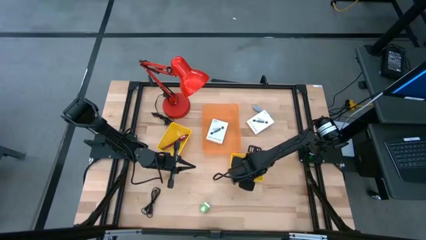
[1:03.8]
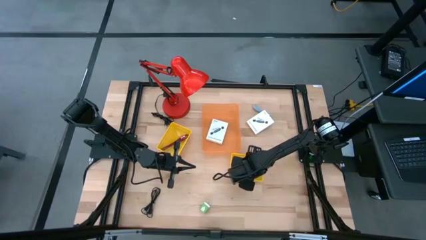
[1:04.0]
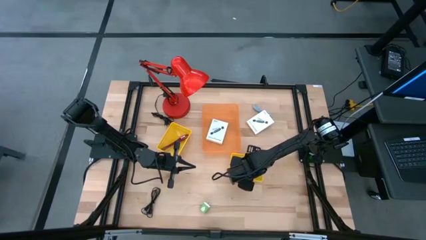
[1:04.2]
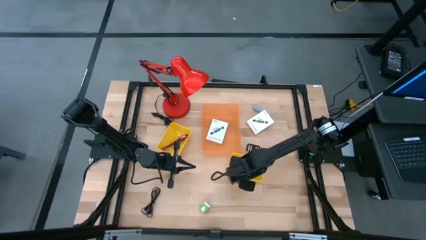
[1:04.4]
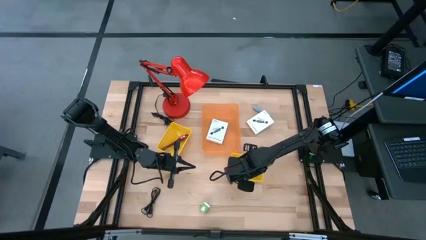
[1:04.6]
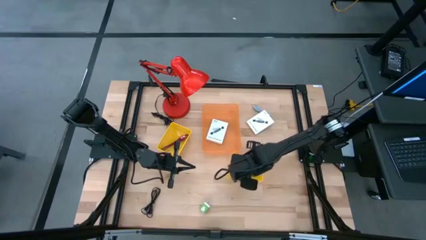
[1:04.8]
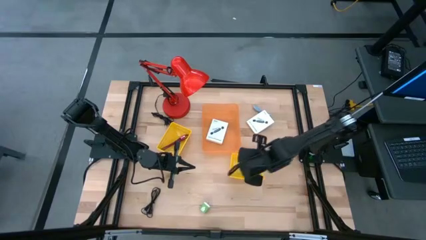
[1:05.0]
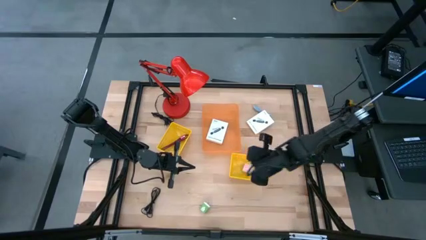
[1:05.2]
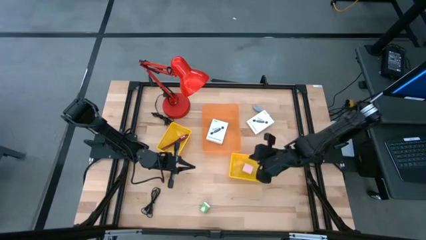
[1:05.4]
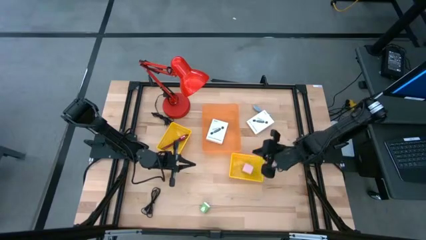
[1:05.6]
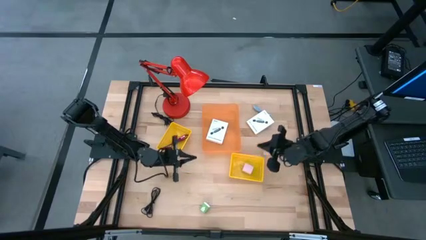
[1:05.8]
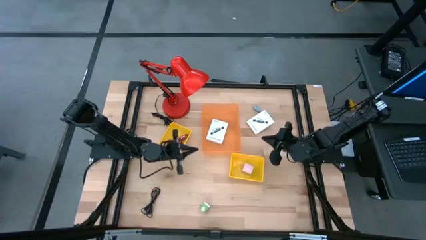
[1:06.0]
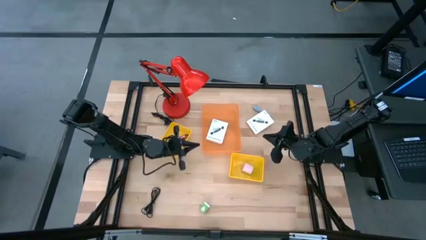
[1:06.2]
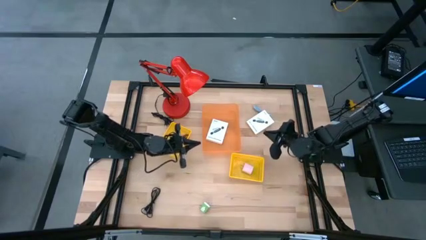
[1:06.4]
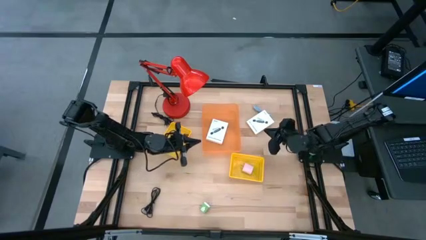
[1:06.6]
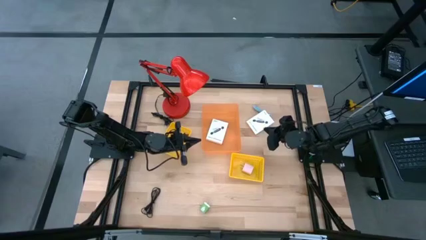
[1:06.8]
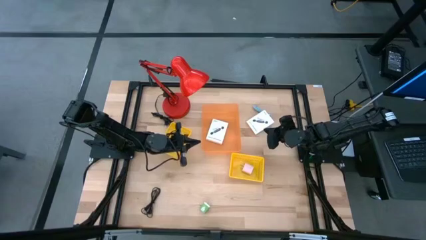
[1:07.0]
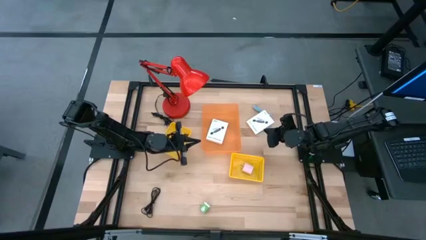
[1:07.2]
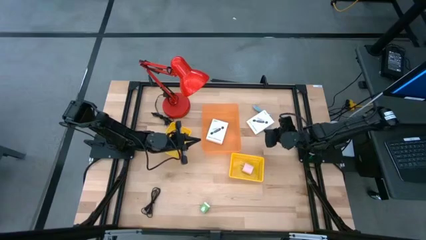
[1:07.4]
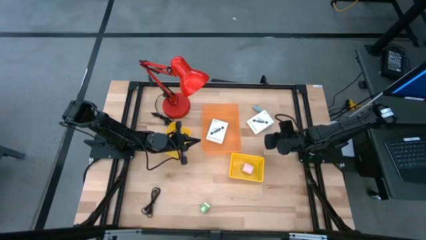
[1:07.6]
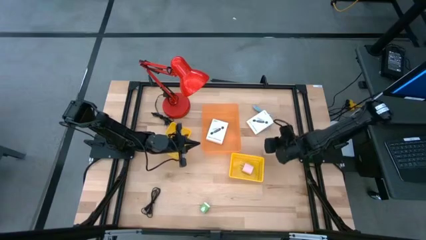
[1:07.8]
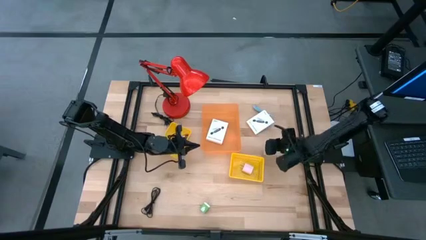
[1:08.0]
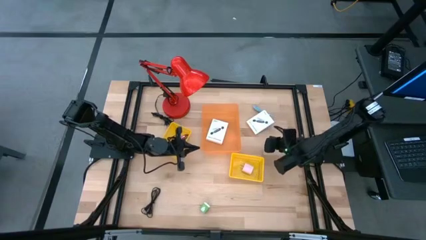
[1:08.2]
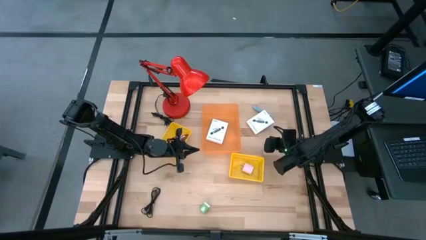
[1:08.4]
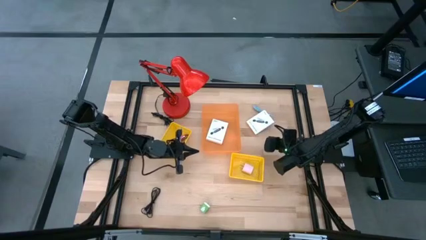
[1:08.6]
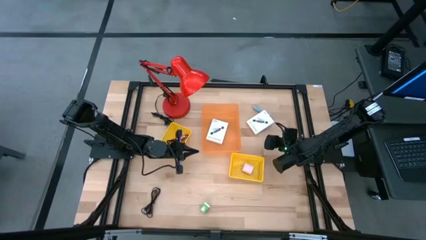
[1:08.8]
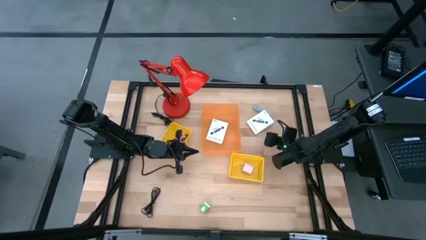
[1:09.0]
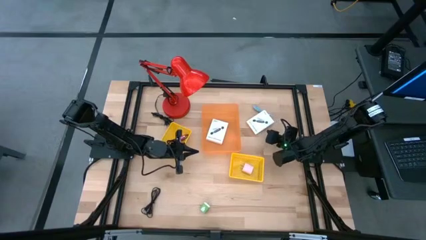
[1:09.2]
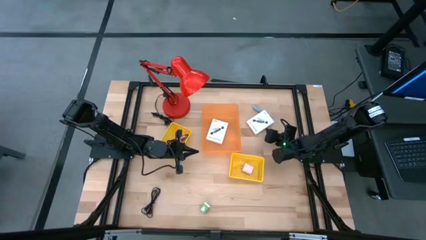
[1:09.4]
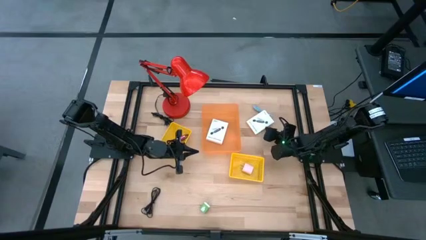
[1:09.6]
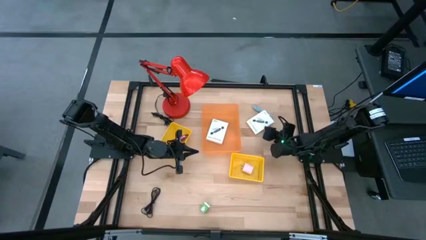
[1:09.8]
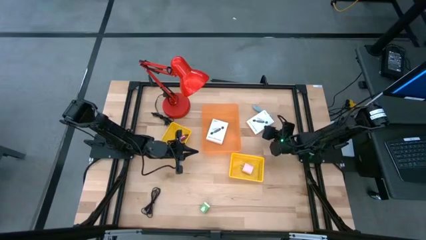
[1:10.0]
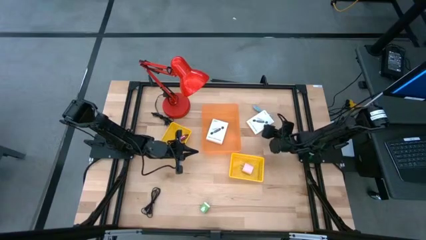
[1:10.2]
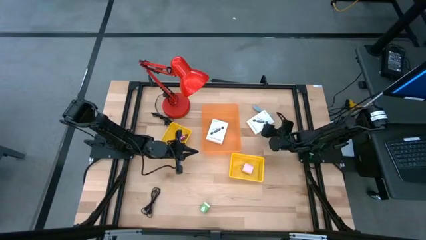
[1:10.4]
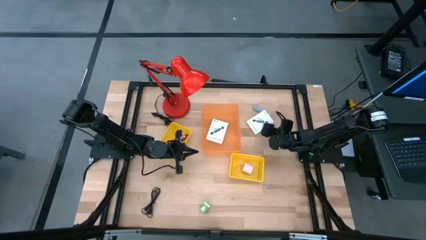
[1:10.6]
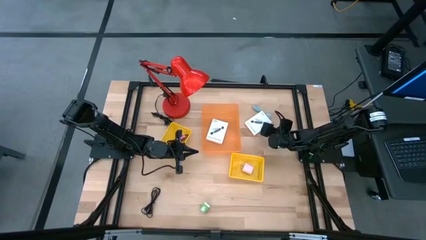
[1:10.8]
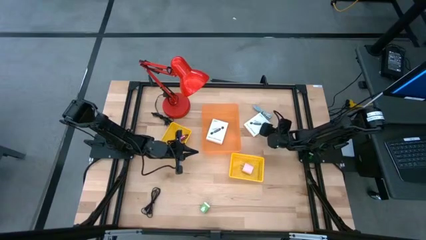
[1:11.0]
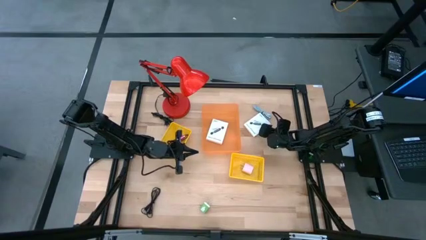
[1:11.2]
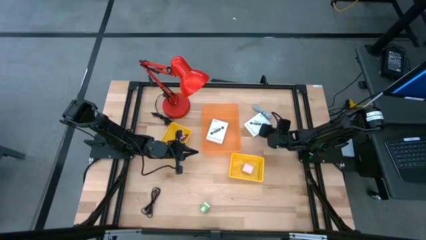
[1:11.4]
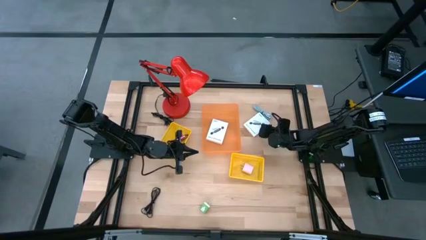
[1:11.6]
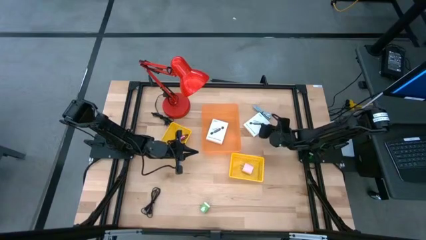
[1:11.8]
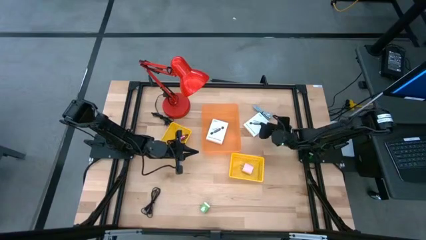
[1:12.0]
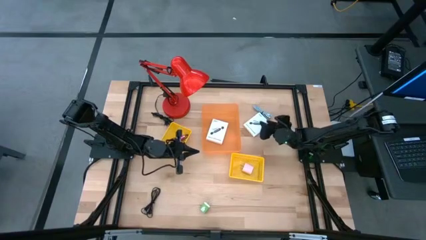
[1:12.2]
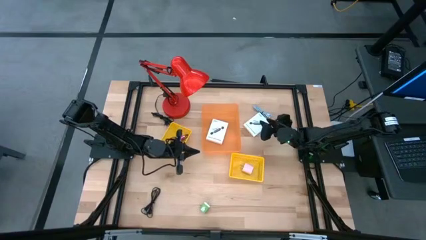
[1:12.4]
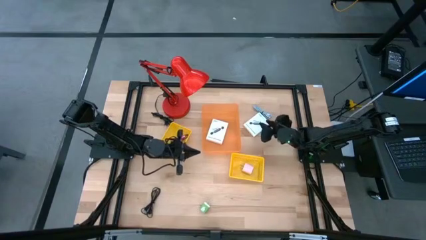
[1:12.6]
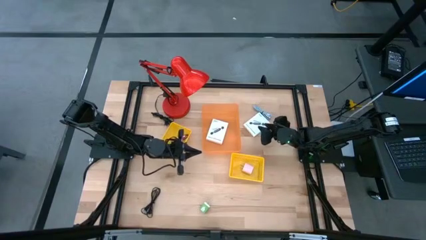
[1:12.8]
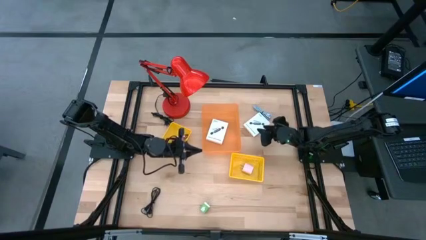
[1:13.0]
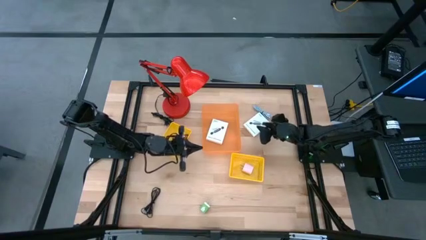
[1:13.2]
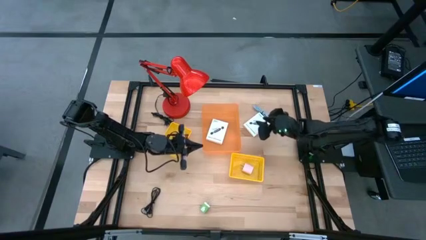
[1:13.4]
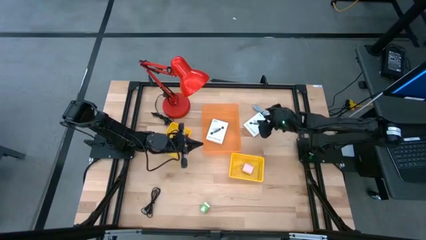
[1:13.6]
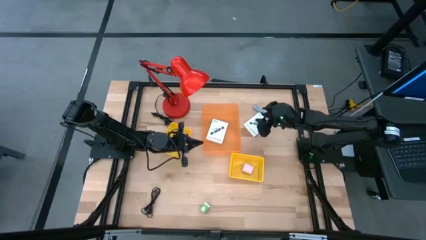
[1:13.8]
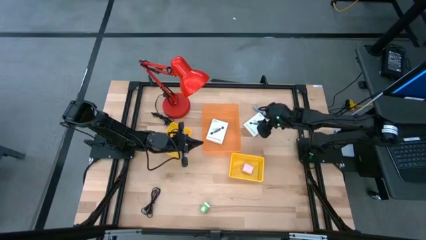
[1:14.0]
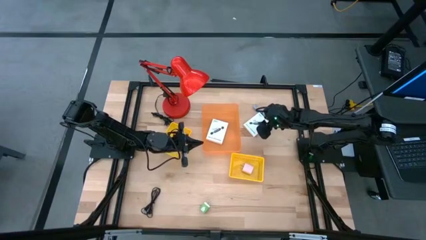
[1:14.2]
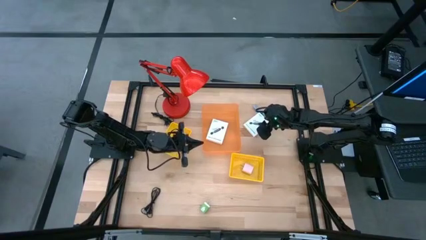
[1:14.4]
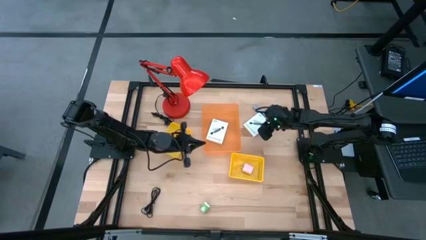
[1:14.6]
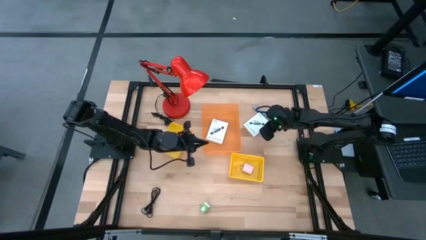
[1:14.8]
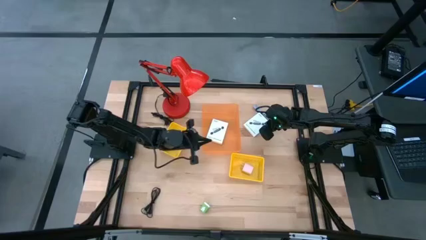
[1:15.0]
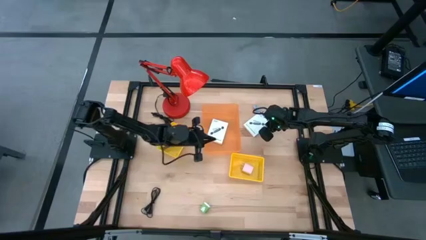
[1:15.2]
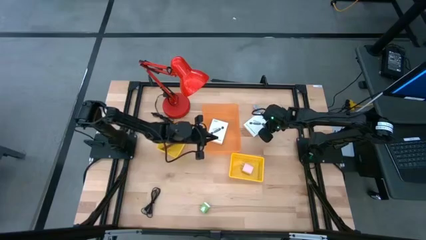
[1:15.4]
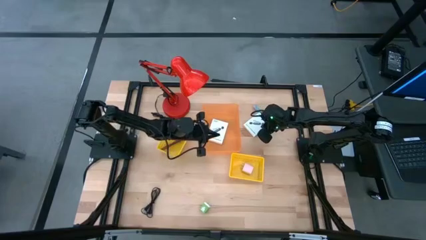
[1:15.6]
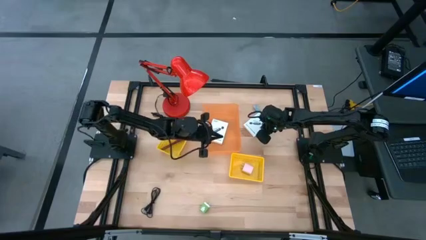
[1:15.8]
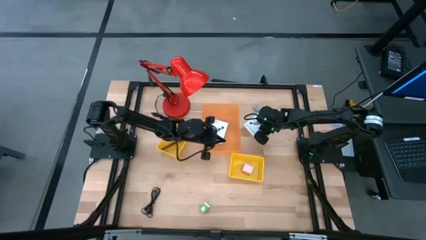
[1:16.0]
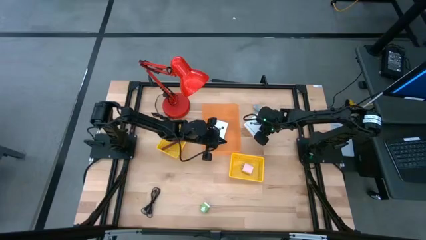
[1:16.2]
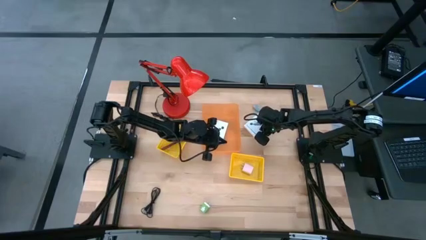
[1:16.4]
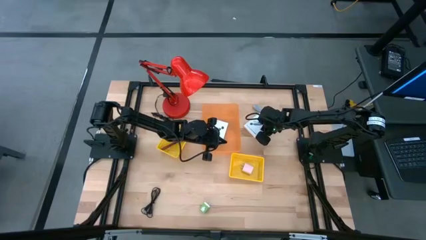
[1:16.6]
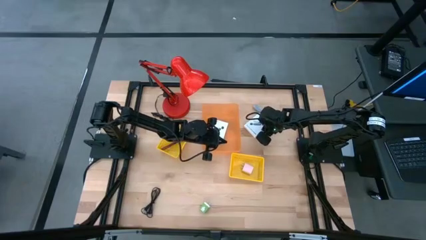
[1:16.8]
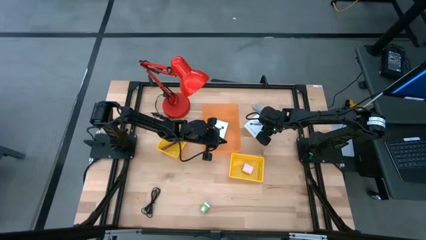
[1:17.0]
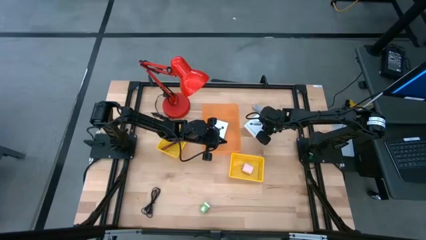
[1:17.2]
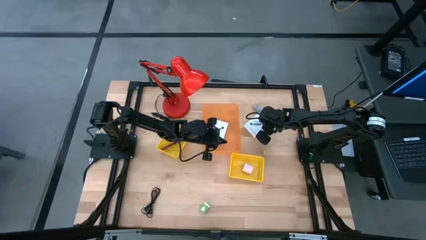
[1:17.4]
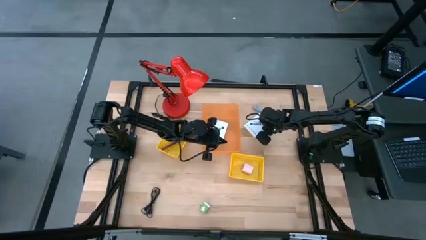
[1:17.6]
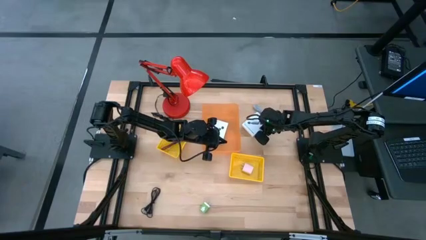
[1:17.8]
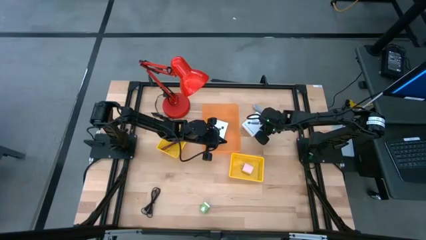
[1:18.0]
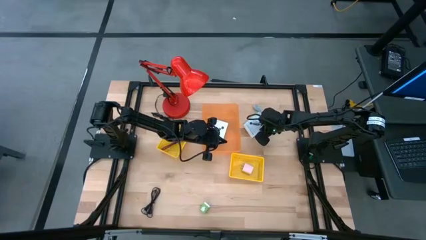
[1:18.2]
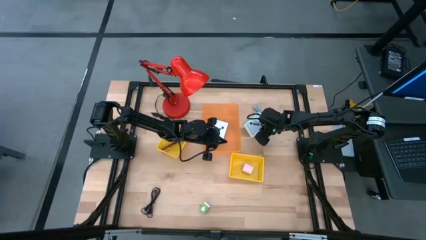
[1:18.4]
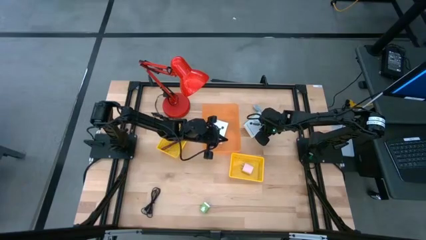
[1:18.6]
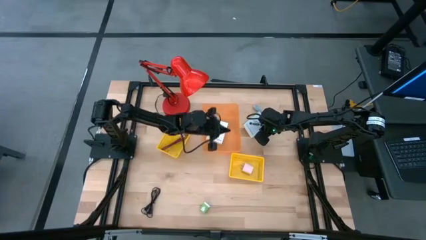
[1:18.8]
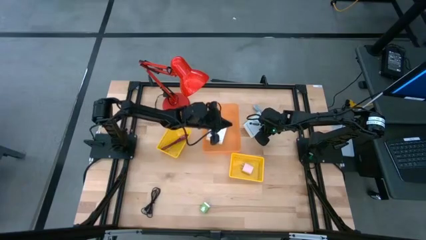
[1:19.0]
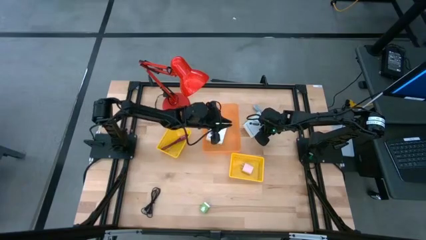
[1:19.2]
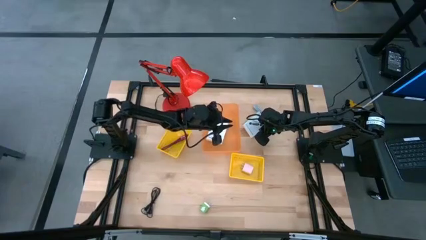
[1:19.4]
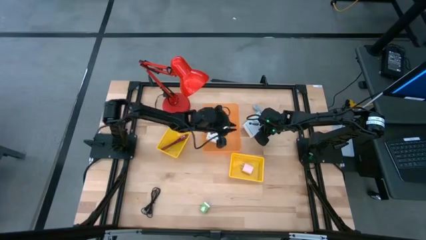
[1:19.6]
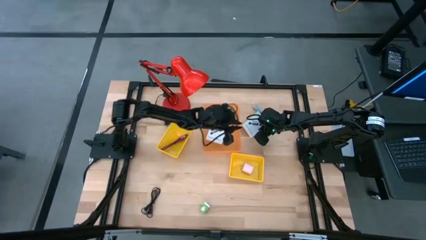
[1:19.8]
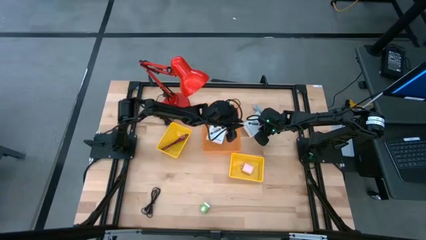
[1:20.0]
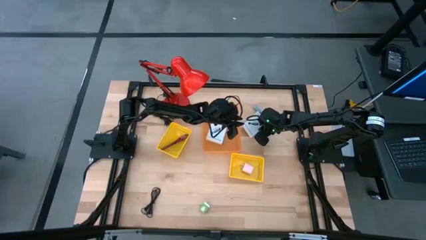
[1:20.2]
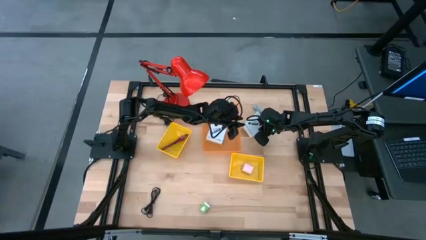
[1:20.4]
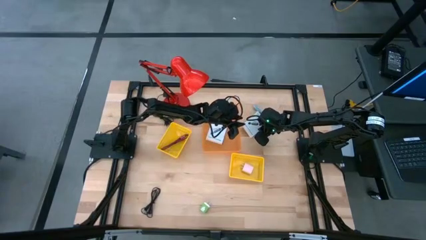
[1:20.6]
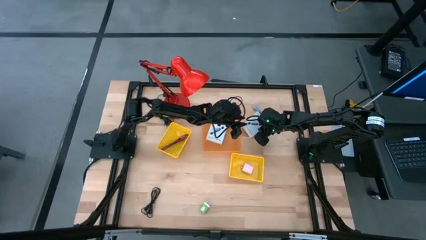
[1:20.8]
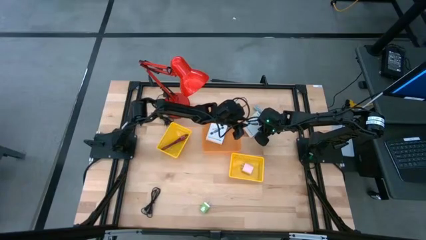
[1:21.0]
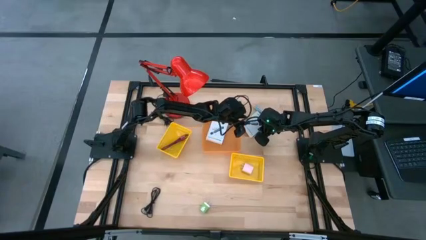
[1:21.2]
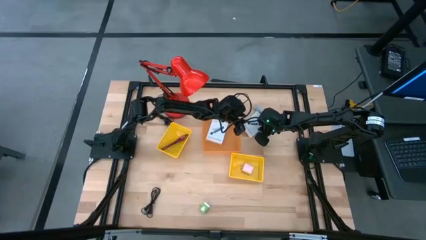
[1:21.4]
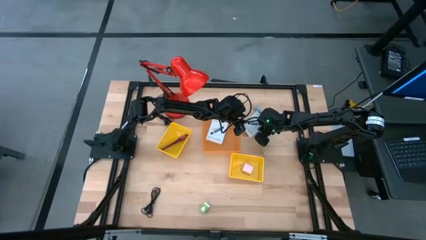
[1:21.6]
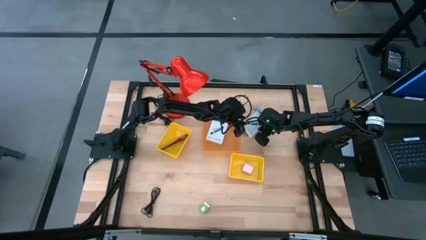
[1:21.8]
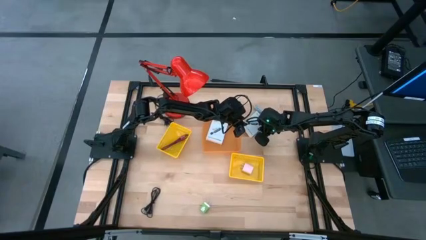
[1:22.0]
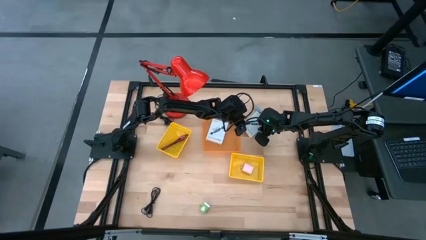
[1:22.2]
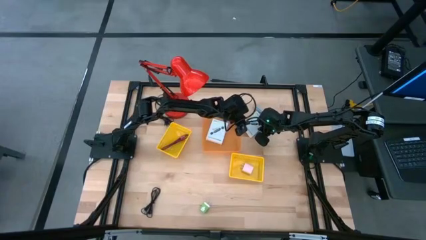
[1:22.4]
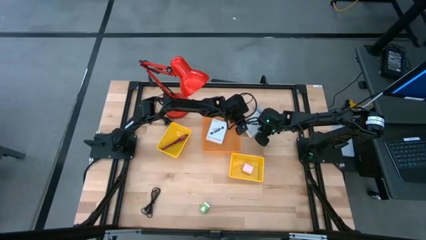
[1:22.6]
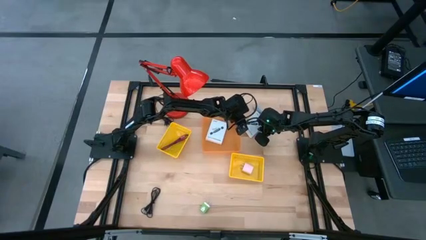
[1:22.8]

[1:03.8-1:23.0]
Task: Pick and place items into bin
Put the card reader box into the orange bin
